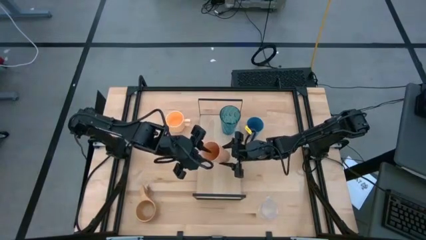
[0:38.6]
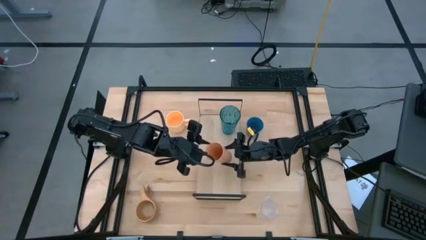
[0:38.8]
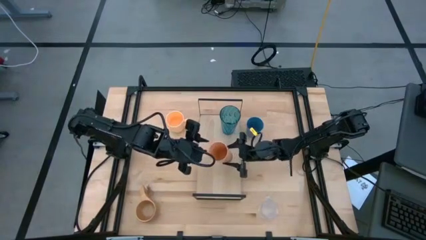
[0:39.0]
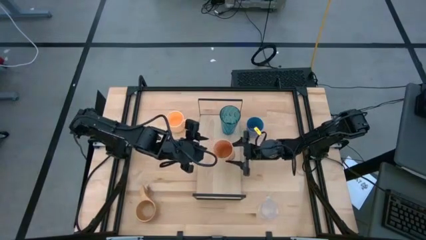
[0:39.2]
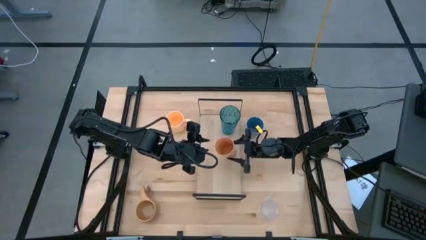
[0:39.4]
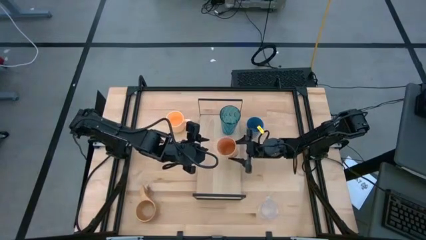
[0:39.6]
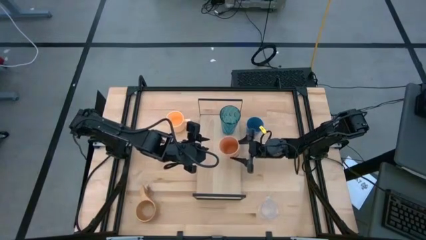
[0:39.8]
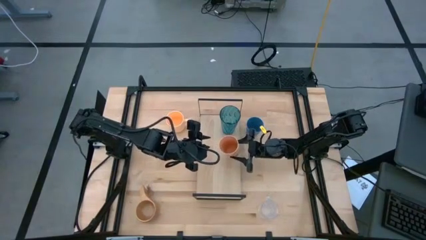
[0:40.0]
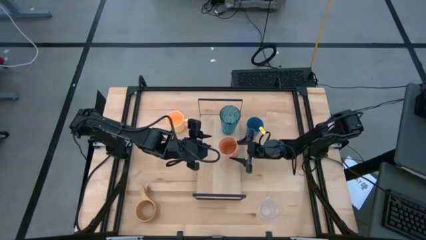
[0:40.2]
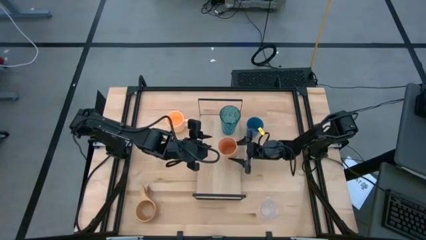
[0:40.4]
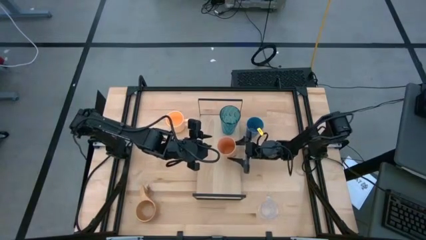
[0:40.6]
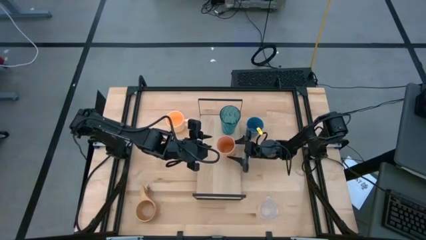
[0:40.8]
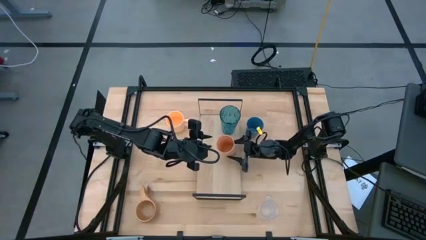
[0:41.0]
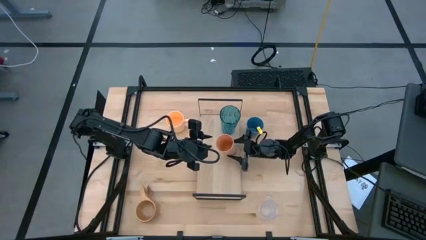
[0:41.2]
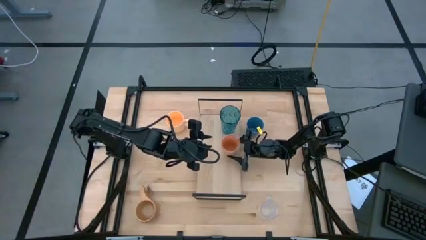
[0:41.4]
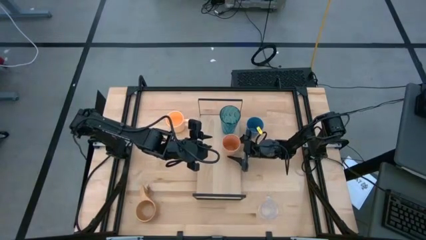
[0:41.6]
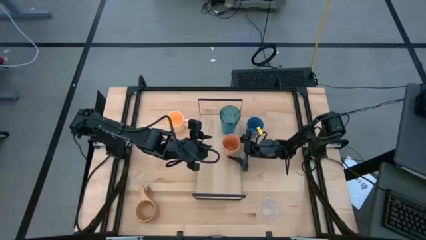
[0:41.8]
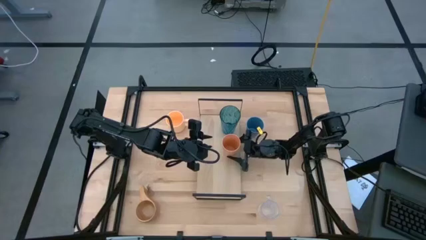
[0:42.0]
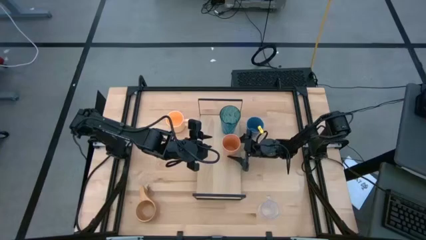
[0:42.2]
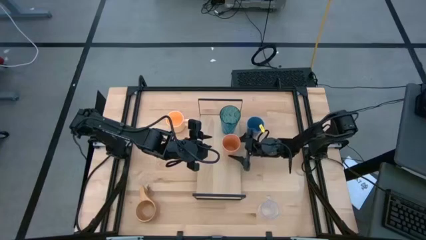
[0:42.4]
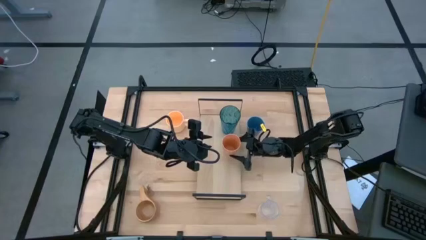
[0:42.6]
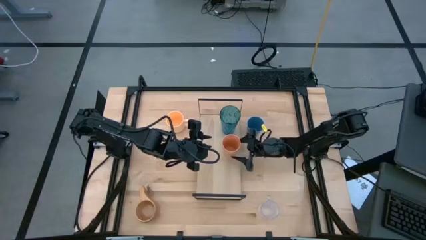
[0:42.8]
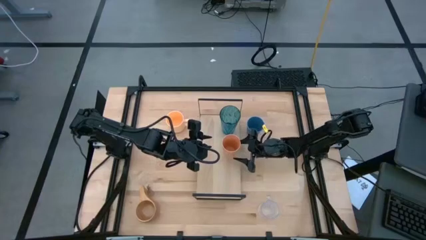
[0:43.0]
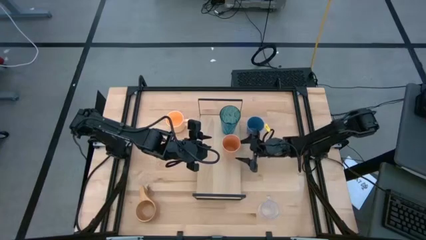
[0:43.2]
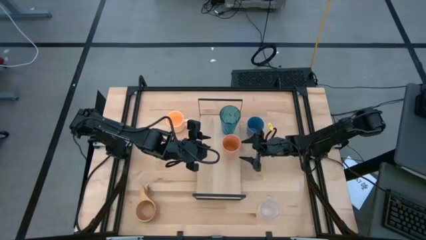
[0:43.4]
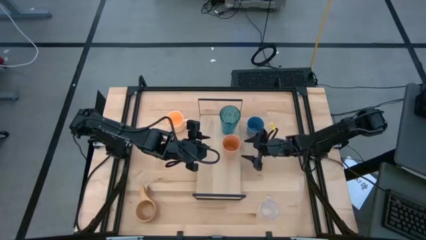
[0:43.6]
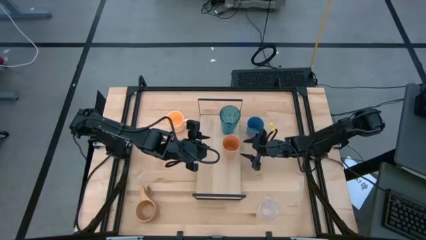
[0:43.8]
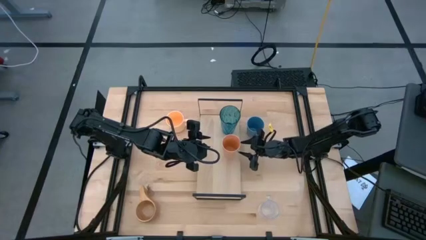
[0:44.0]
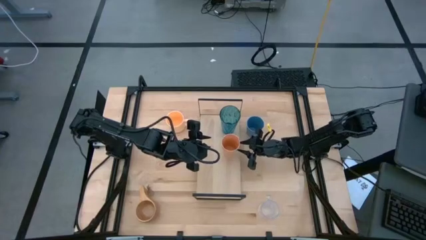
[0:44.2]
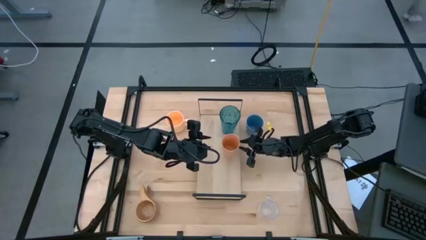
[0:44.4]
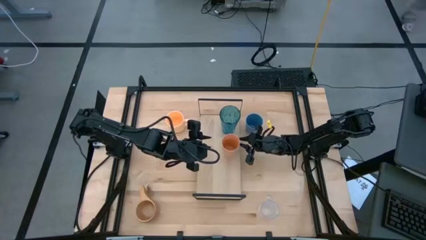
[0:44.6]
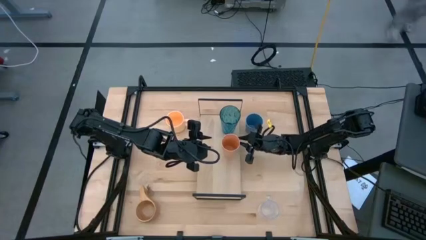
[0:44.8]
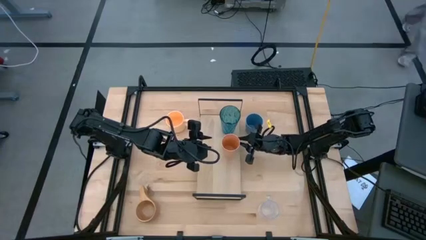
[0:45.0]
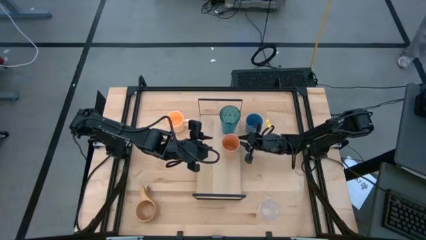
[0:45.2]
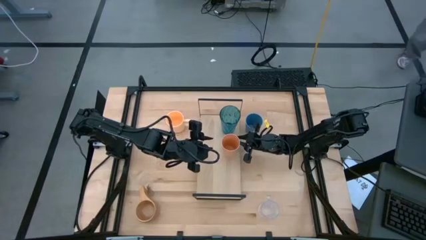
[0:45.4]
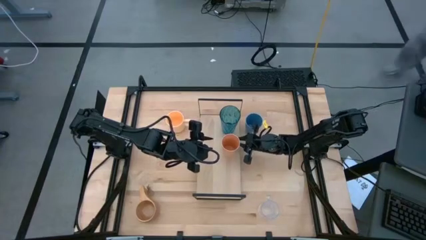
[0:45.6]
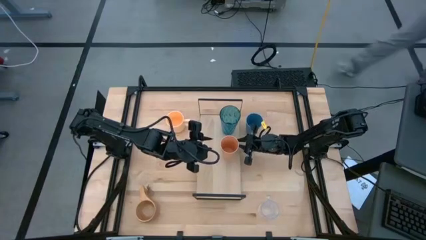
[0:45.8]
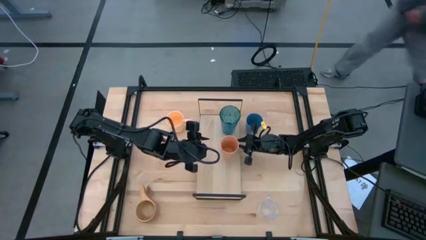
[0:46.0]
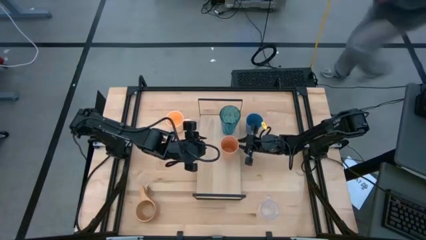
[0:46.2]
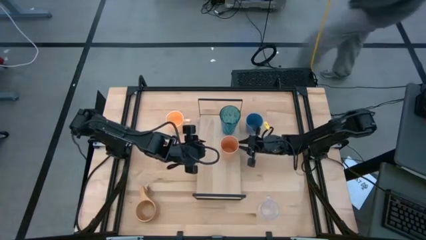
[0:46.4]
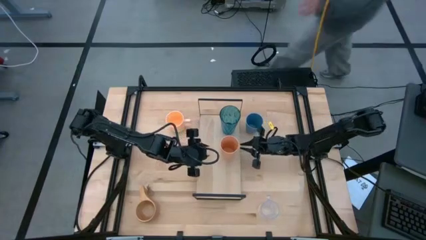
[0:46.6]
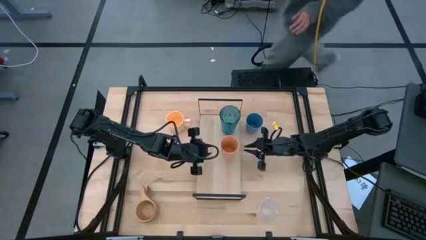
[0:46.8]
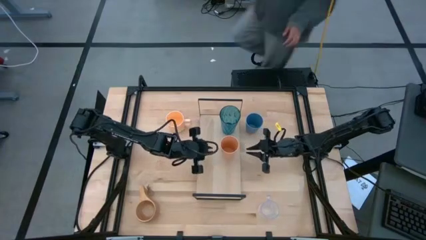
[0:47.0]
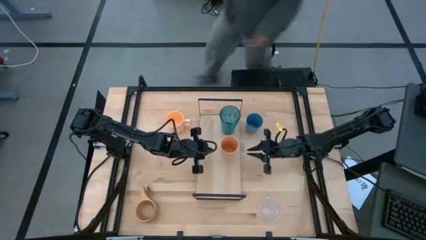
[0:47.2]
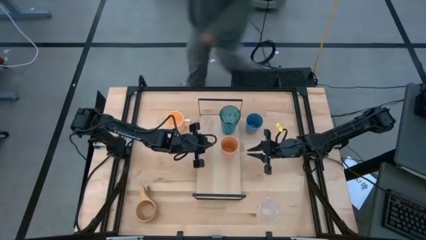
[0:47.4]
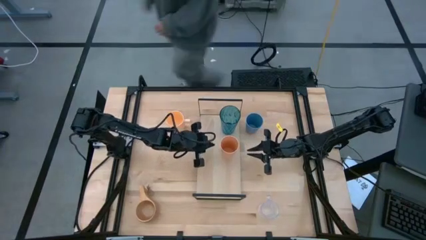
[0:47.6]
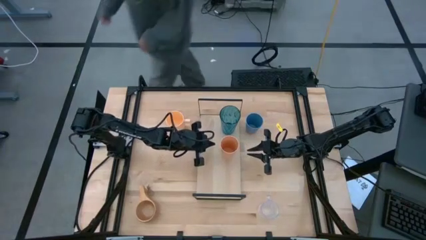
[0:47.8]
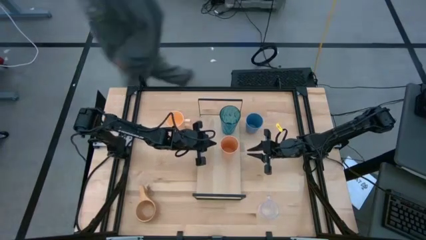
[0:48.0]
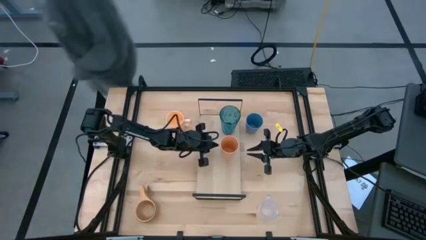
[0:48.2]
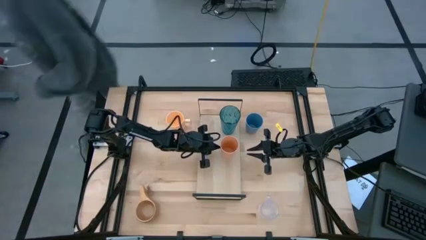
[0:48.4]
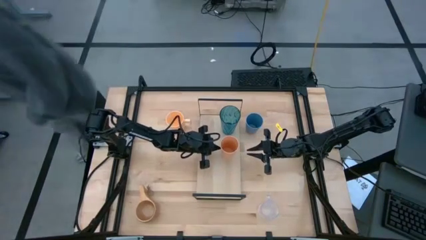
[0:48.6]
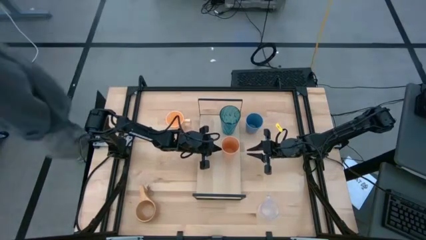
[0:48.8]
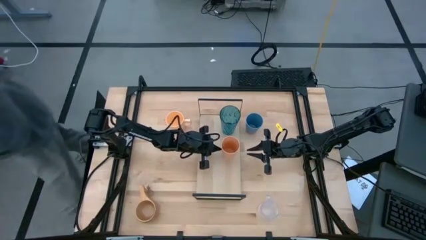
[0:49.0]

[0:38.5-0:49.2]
Task: Stack small to large cups/mugs on shelf
Put the orange cup on the shelf
